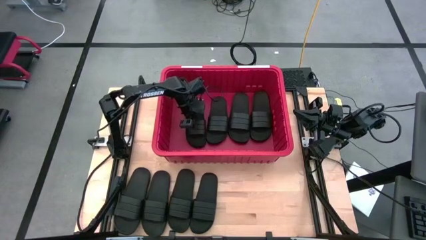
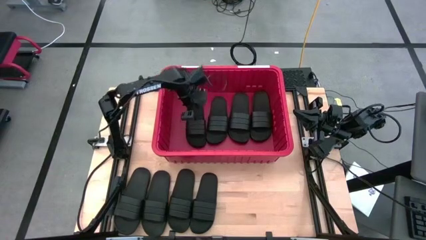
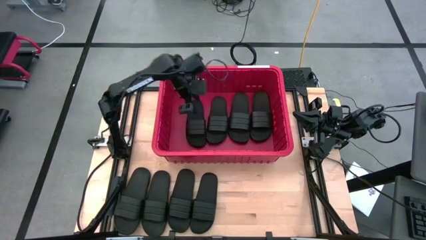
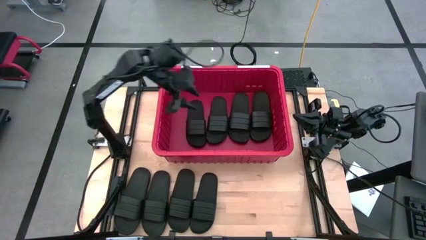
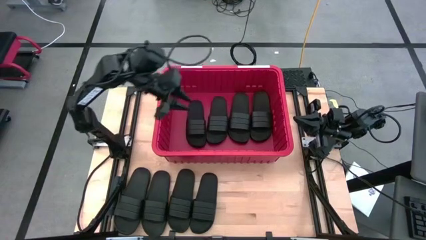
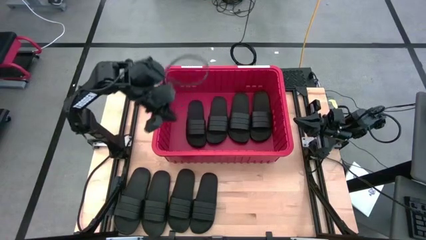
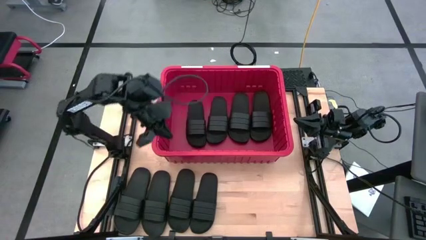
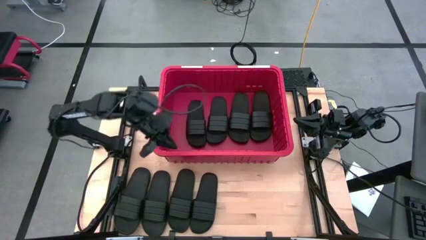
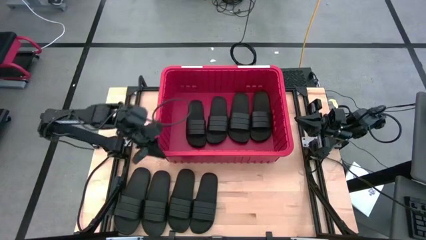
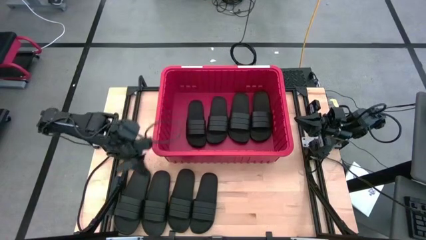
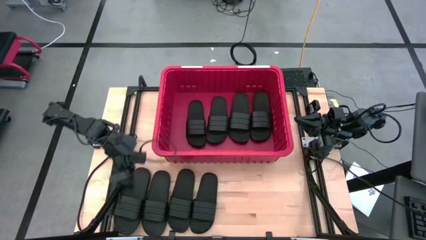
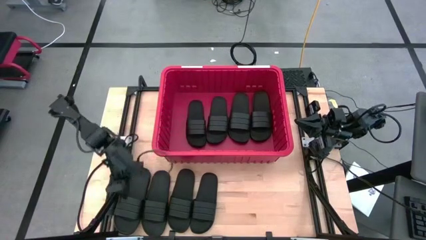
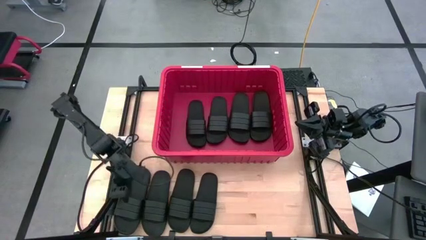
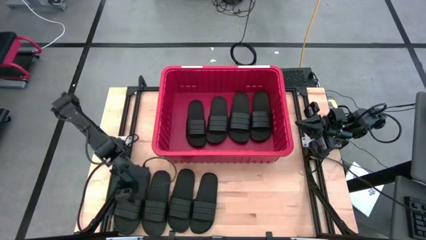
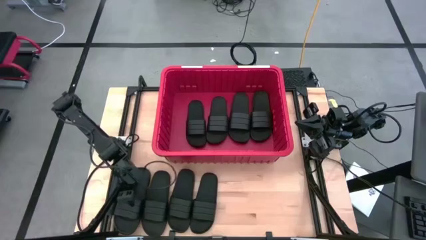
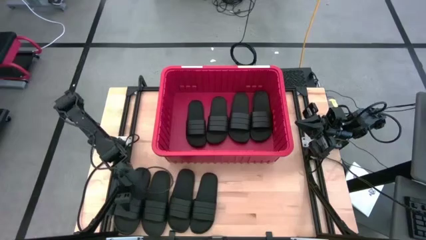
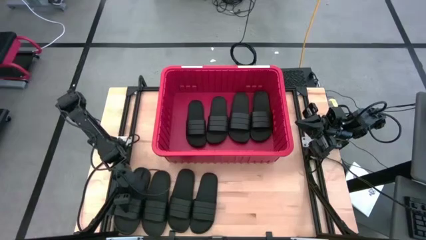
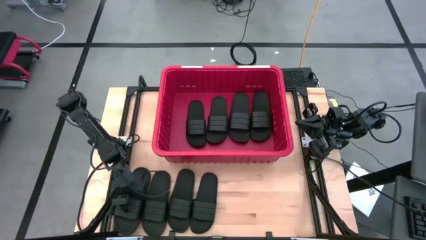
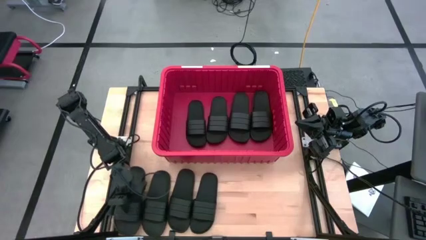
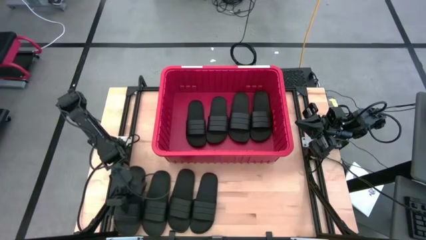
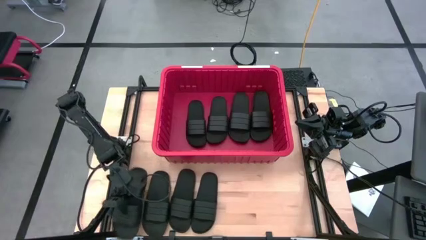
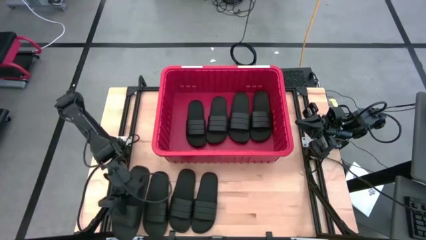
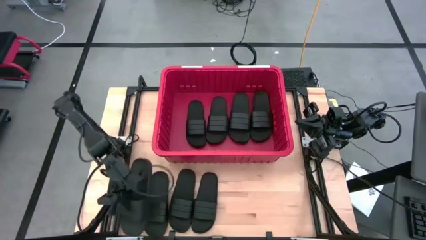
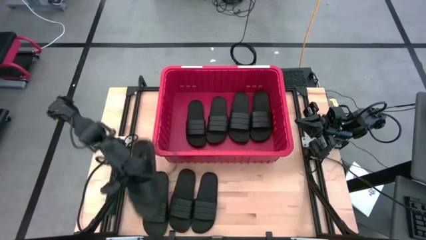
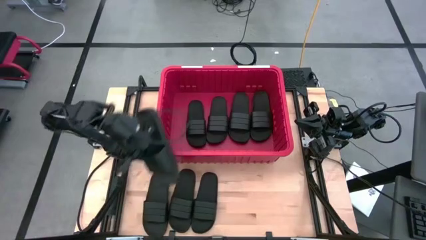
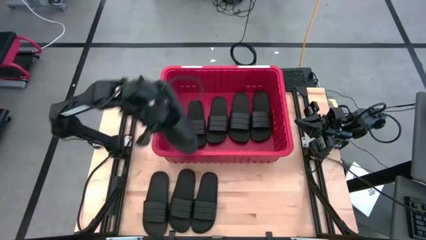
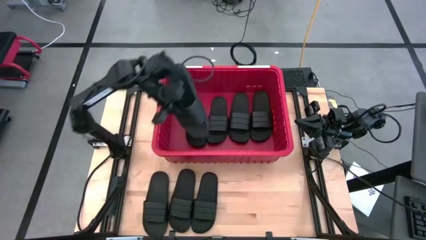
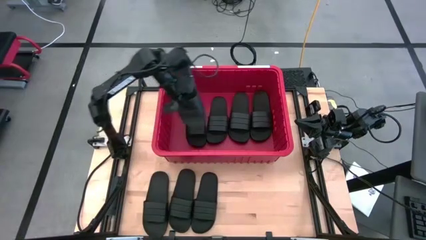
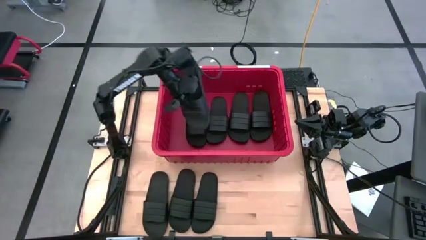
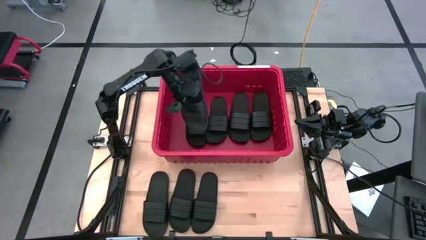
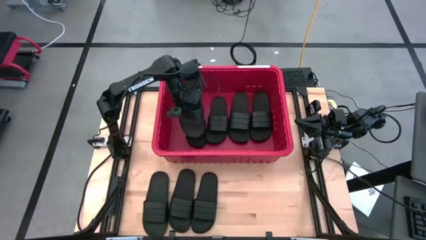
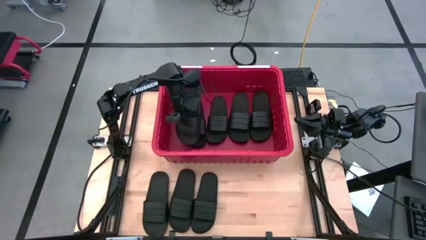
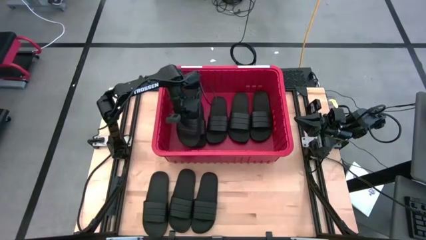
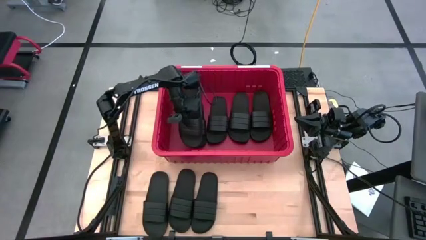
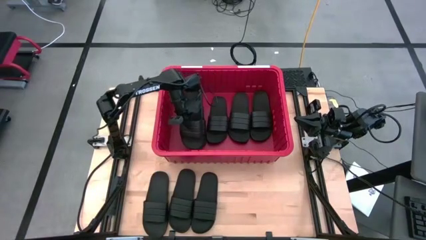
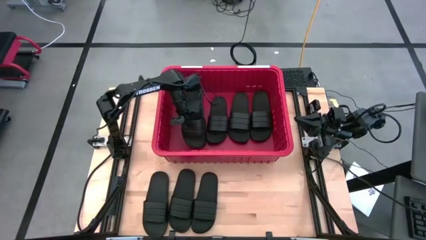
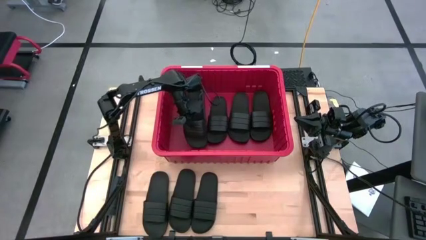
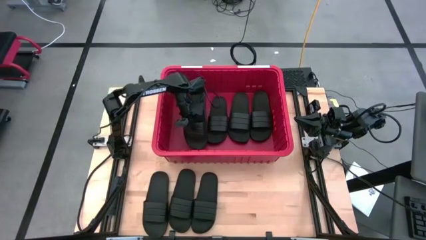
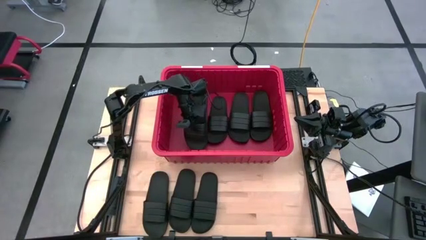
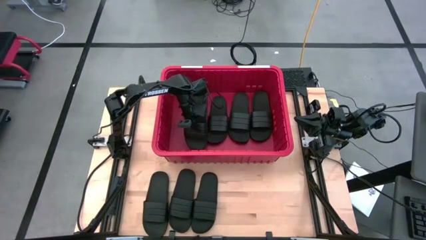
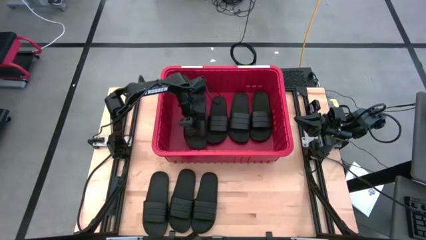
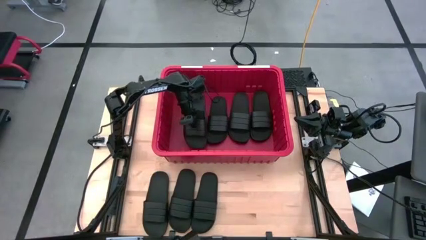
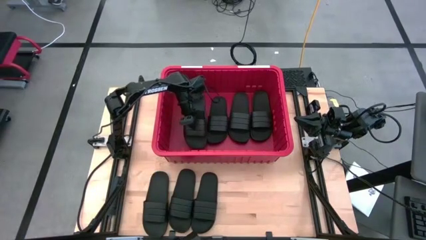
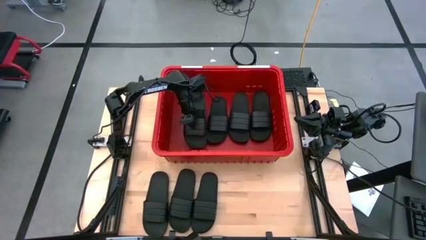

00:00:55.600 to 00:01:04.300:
Task: Pick and place slides into bin
Put the black slipper into the bin

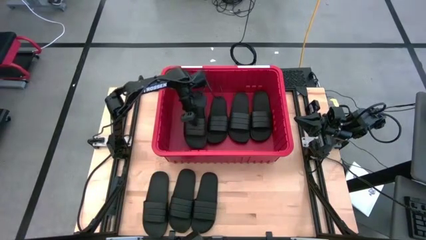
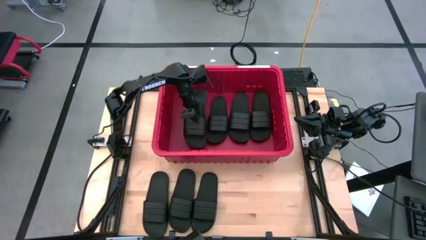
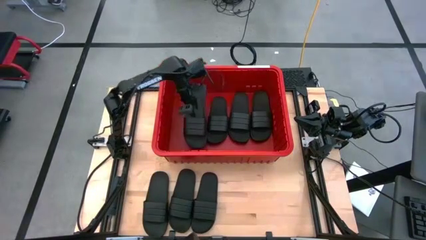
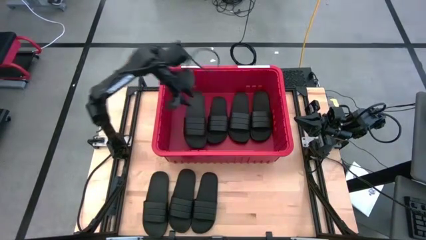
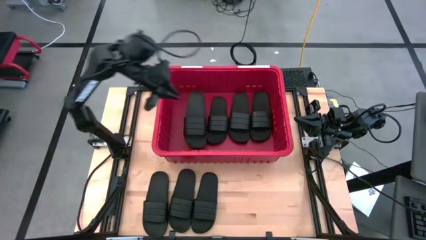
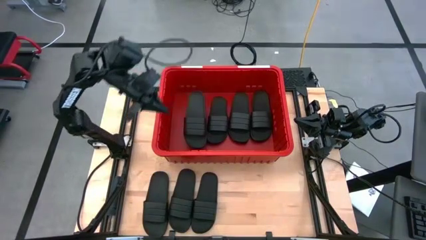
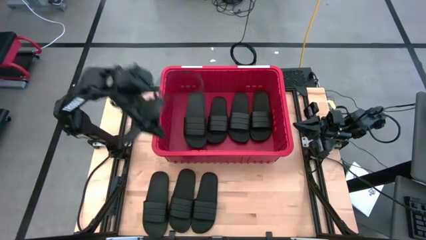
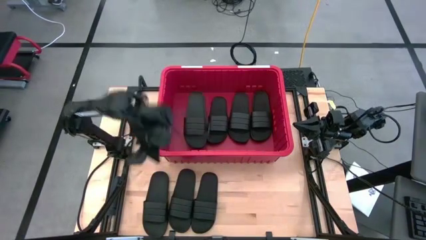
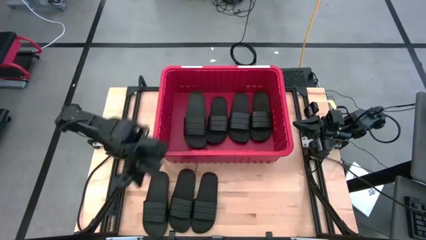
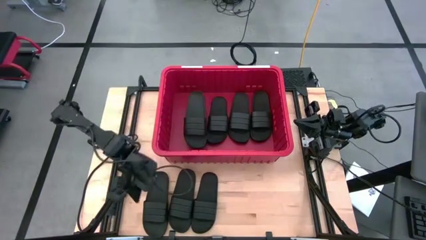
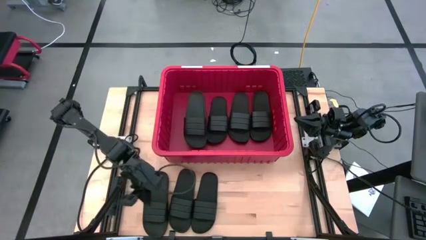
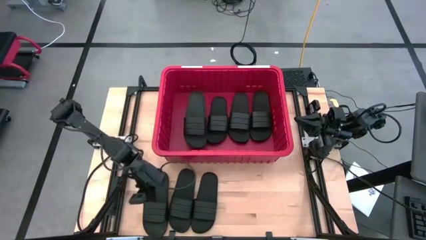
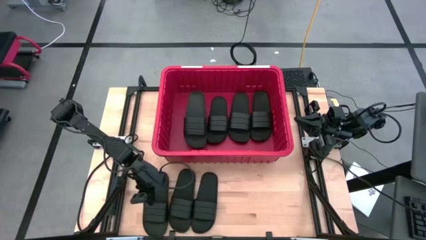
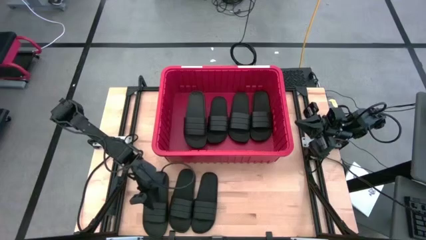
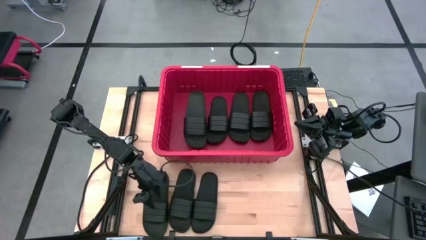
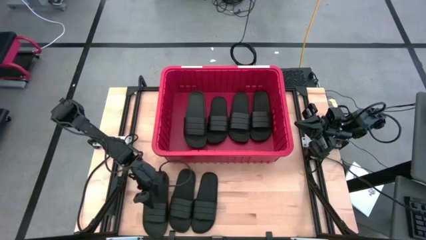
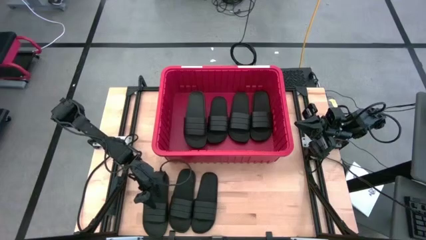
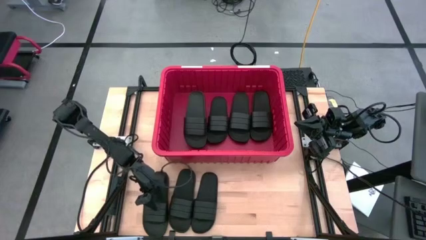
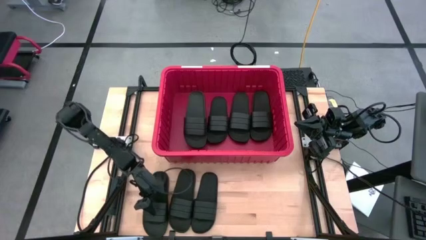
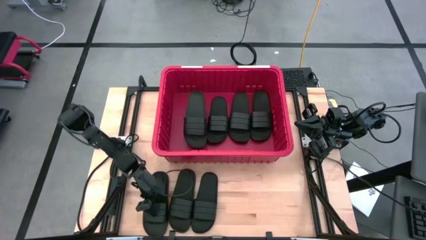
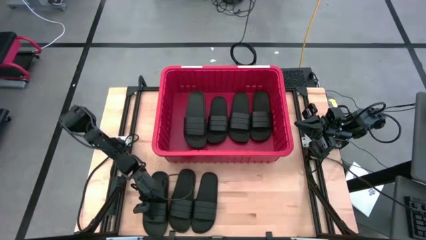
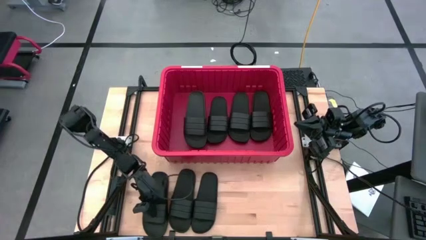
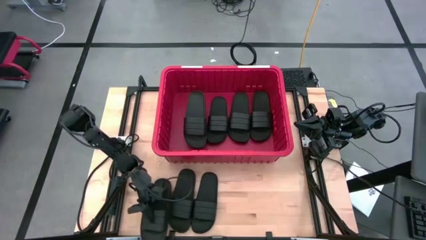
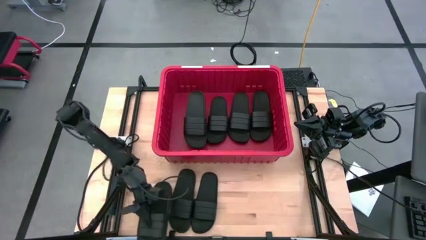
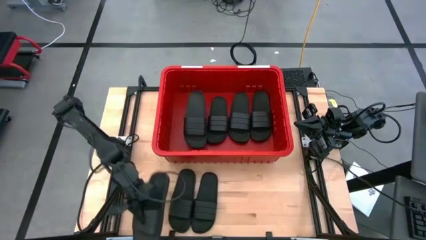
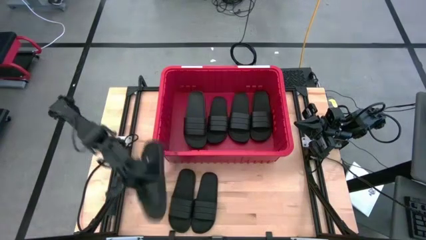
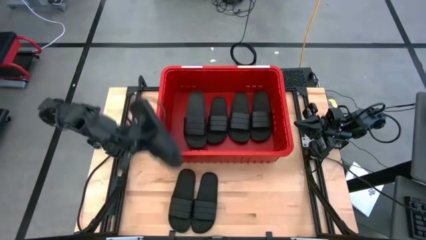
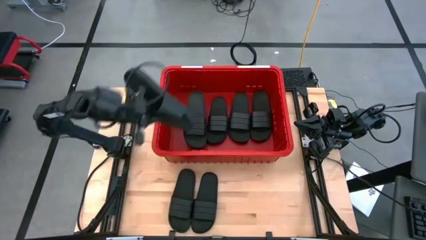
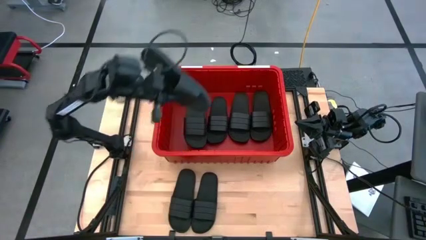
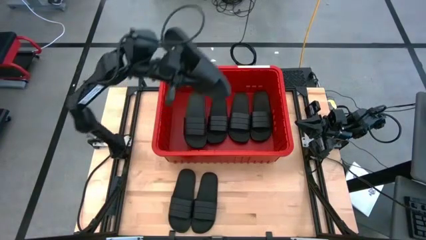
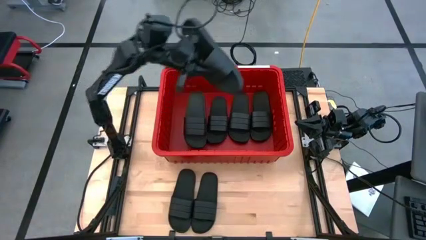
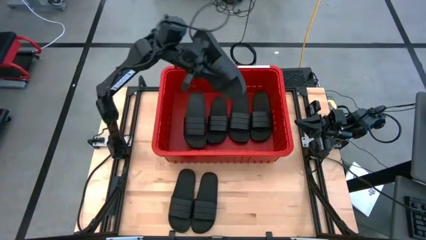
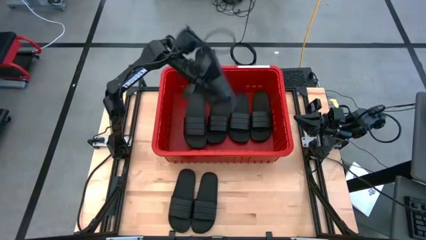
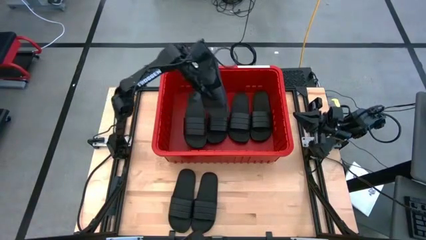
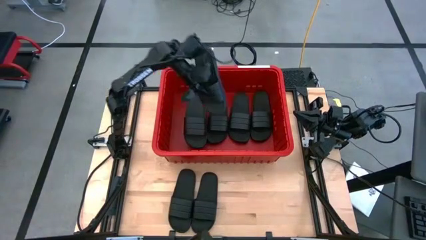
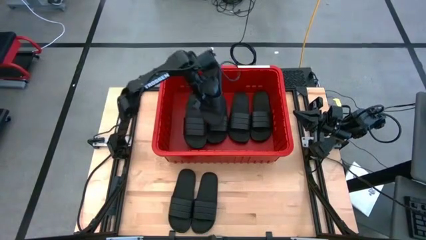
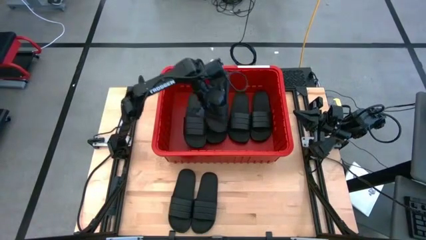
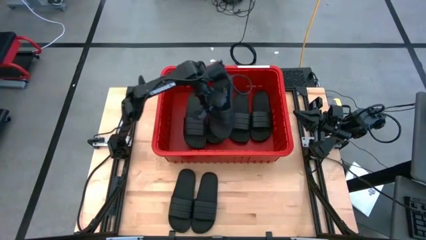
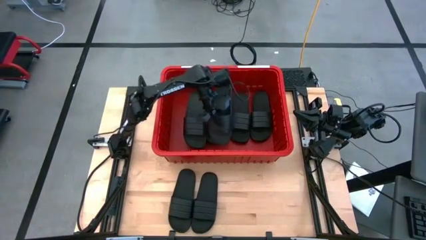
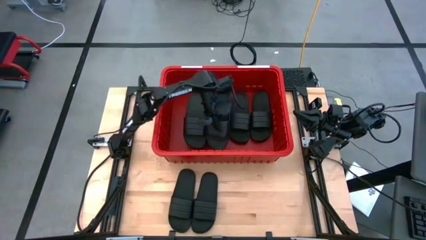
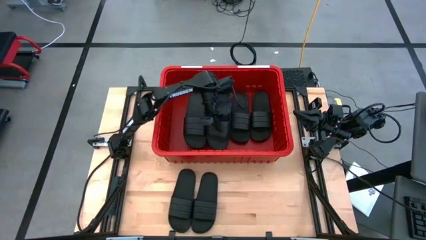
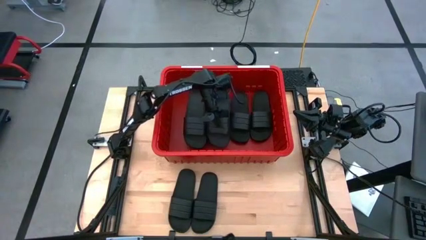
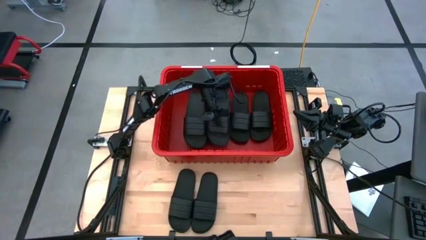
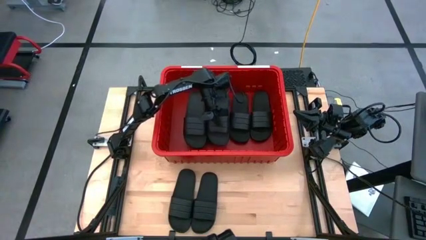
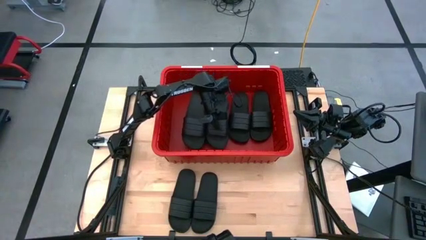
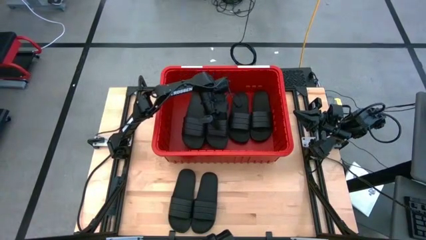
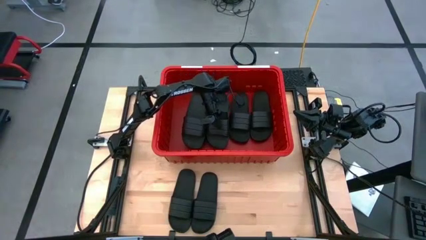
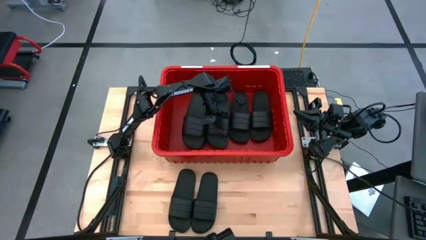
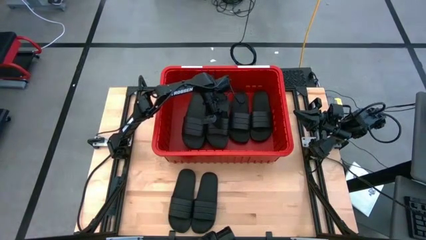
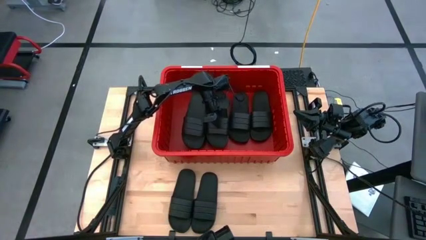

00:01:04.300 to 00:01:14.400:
Put the left black slipper into the bin
